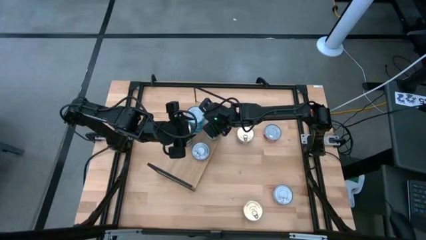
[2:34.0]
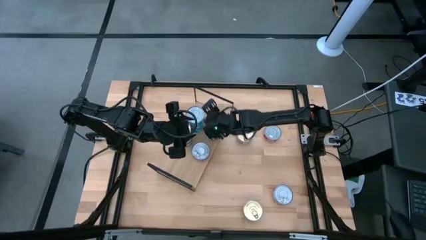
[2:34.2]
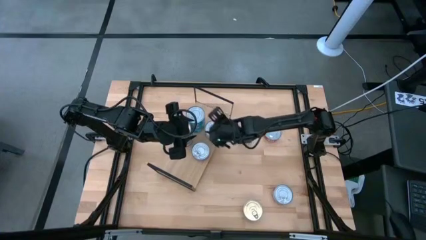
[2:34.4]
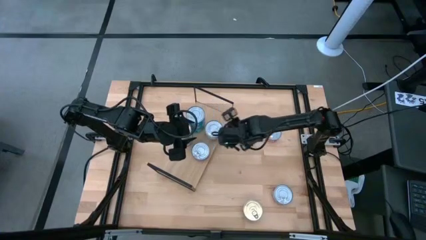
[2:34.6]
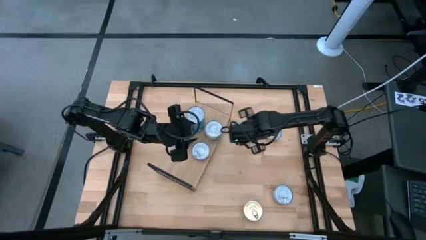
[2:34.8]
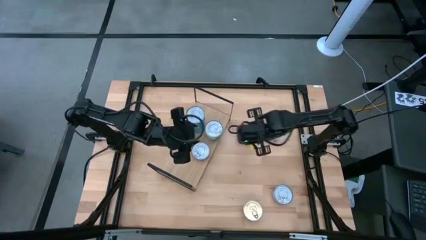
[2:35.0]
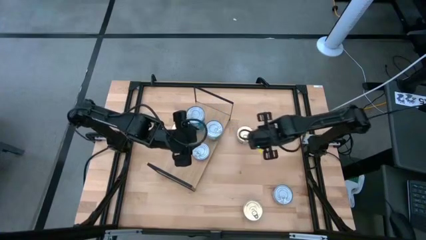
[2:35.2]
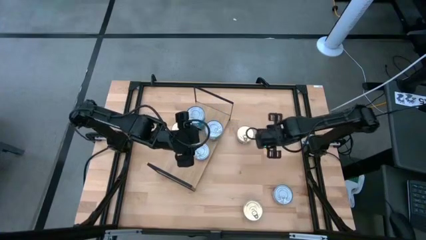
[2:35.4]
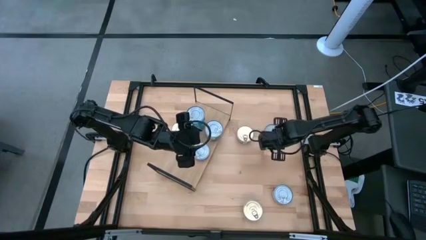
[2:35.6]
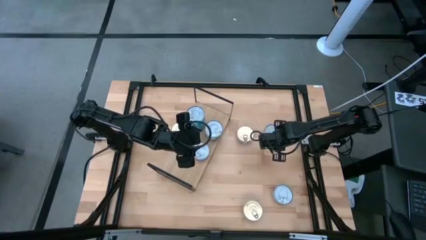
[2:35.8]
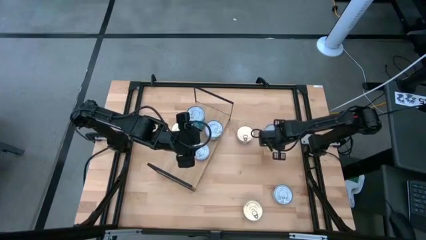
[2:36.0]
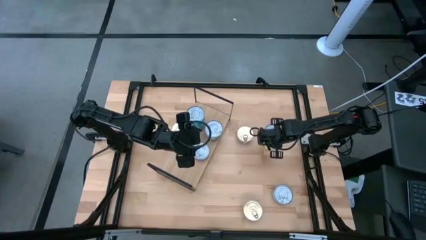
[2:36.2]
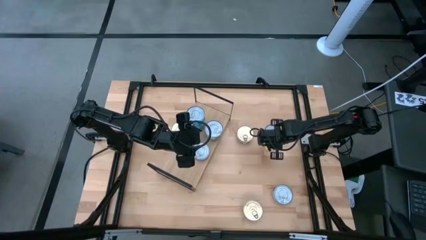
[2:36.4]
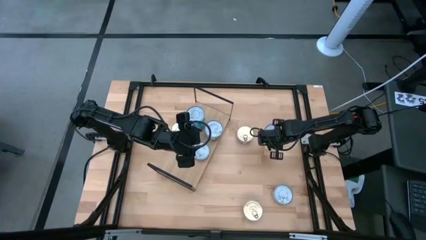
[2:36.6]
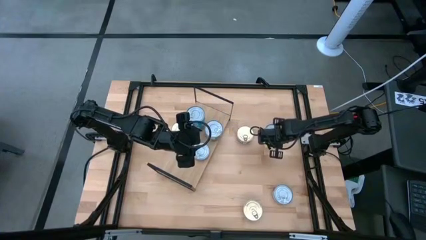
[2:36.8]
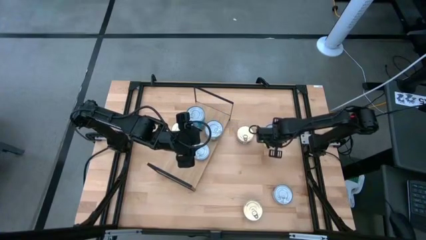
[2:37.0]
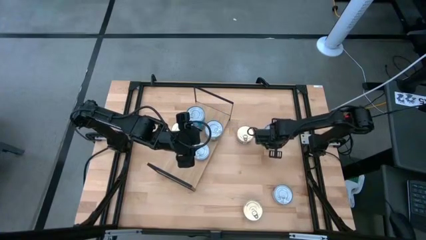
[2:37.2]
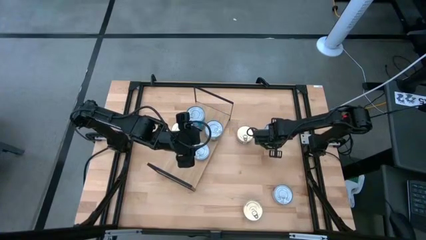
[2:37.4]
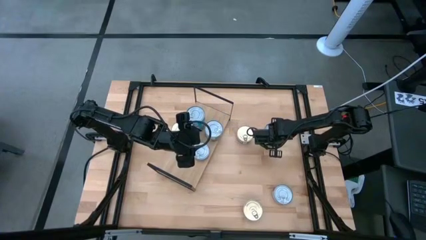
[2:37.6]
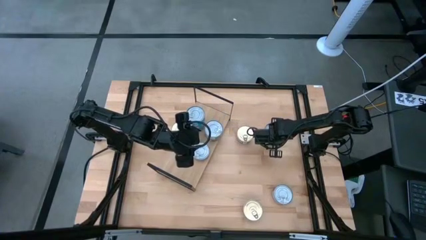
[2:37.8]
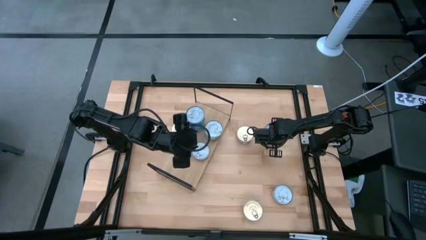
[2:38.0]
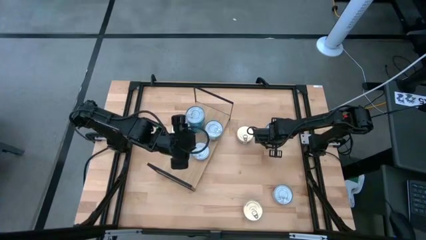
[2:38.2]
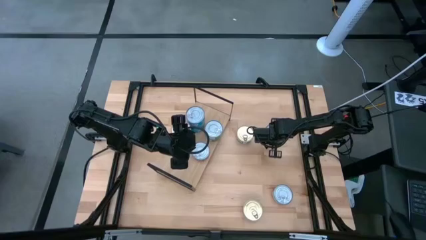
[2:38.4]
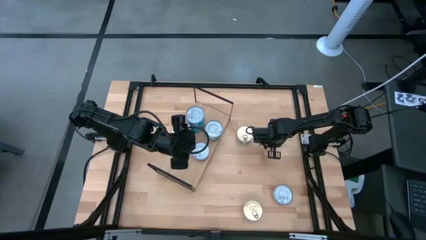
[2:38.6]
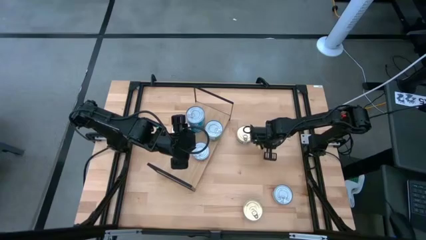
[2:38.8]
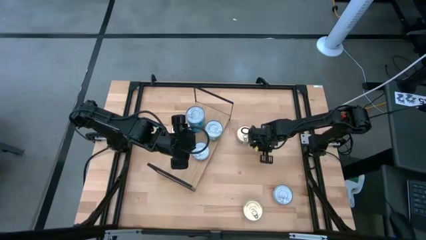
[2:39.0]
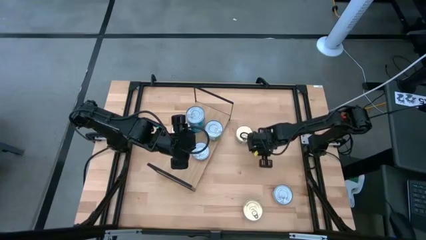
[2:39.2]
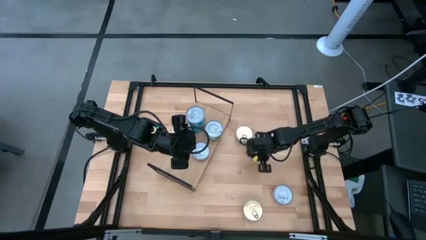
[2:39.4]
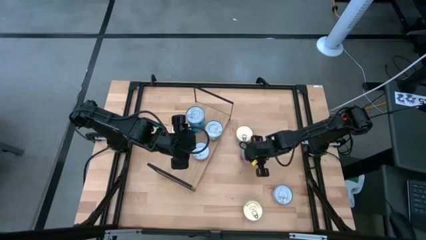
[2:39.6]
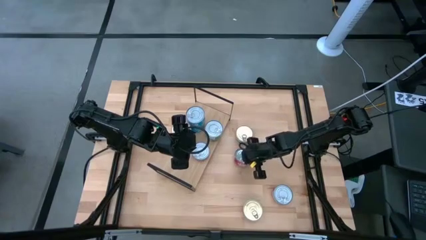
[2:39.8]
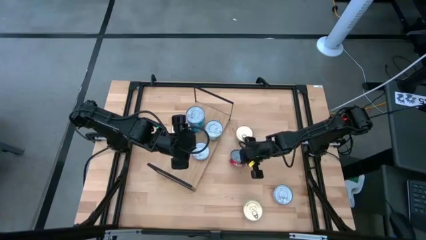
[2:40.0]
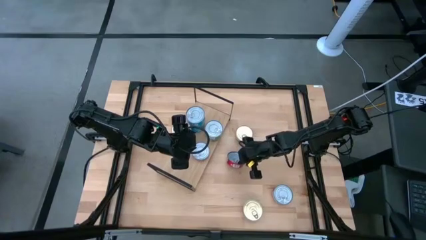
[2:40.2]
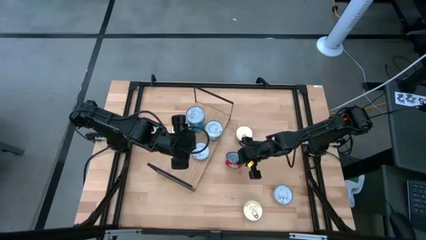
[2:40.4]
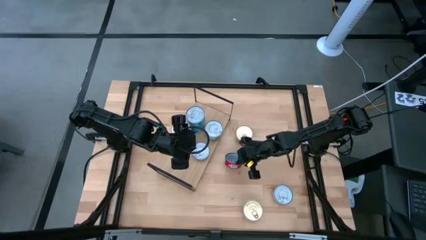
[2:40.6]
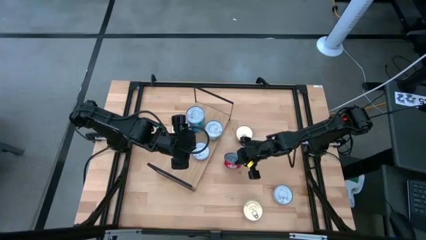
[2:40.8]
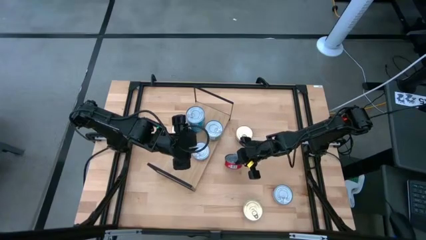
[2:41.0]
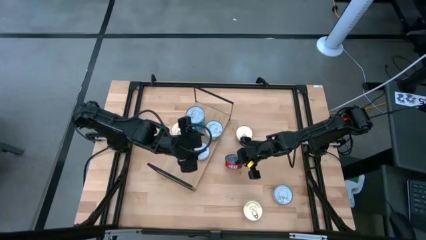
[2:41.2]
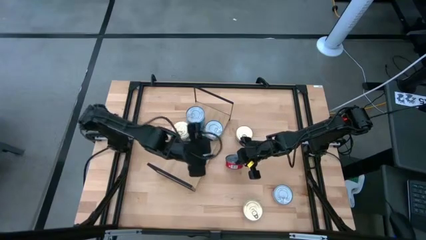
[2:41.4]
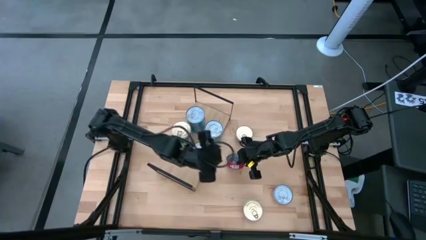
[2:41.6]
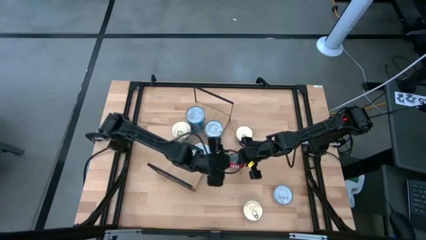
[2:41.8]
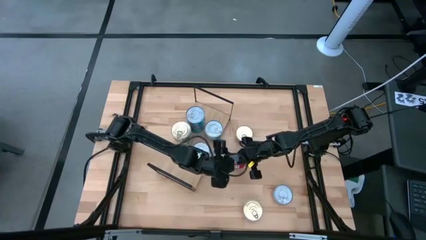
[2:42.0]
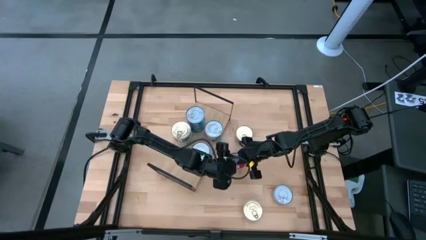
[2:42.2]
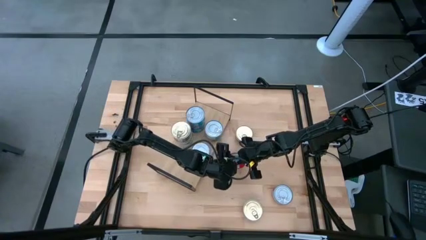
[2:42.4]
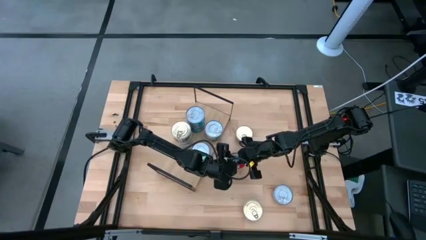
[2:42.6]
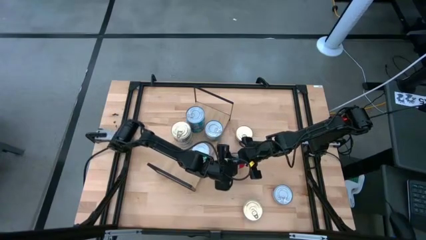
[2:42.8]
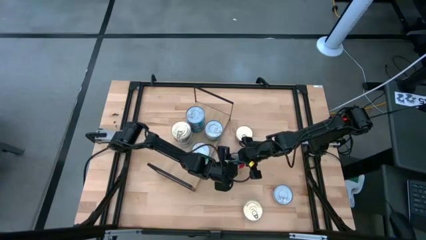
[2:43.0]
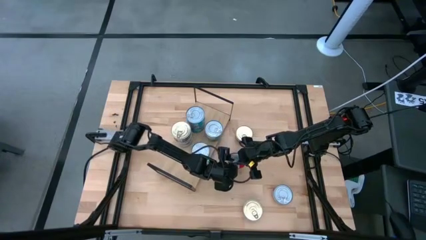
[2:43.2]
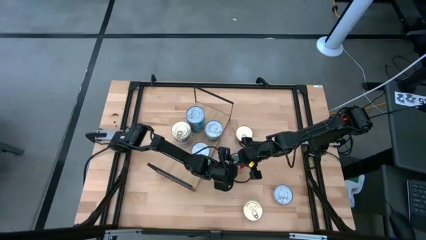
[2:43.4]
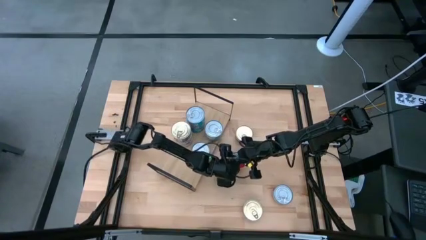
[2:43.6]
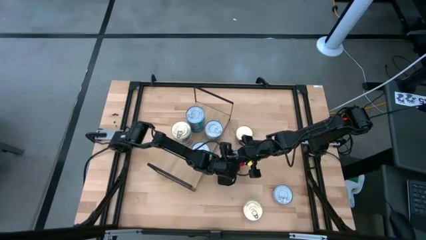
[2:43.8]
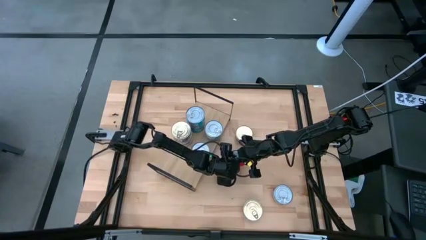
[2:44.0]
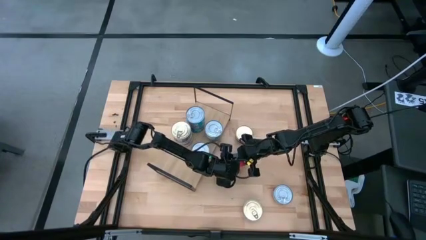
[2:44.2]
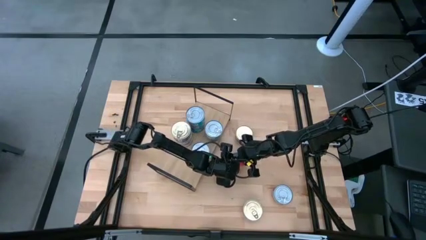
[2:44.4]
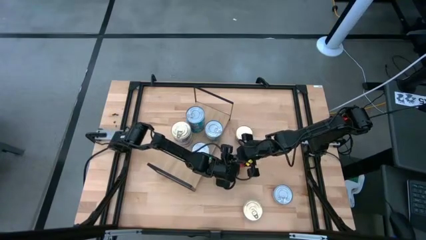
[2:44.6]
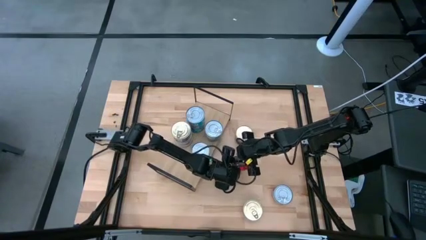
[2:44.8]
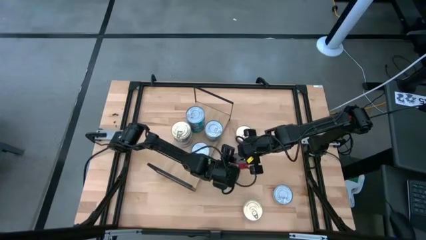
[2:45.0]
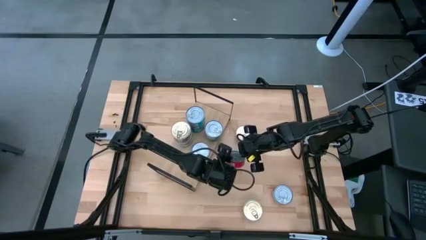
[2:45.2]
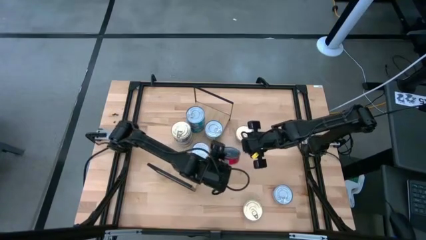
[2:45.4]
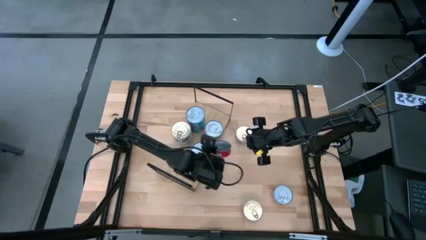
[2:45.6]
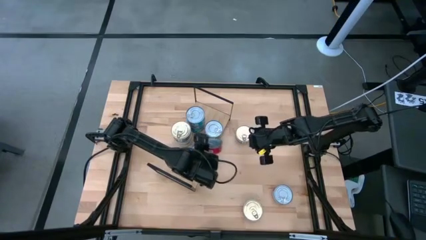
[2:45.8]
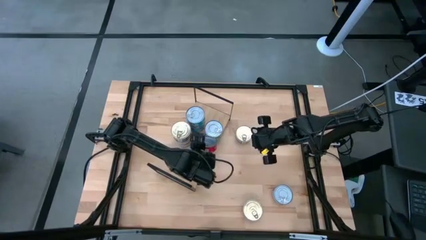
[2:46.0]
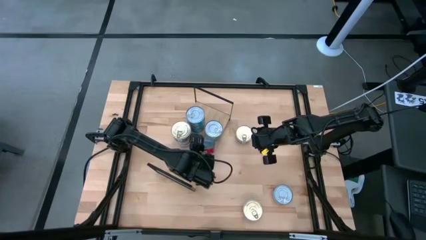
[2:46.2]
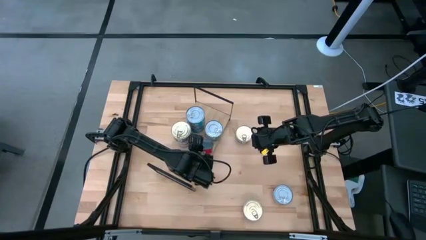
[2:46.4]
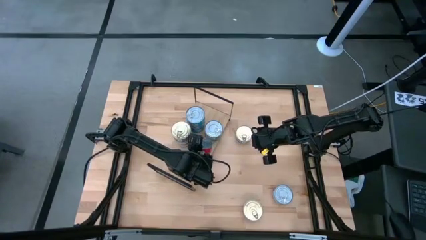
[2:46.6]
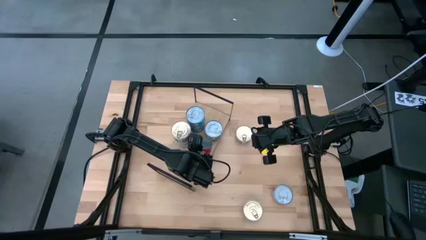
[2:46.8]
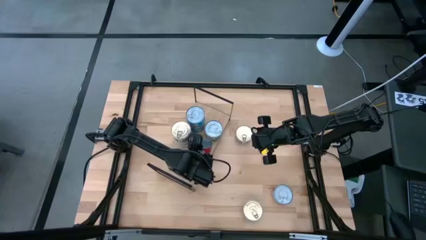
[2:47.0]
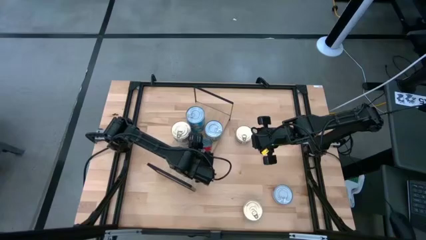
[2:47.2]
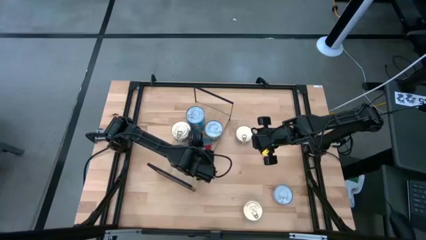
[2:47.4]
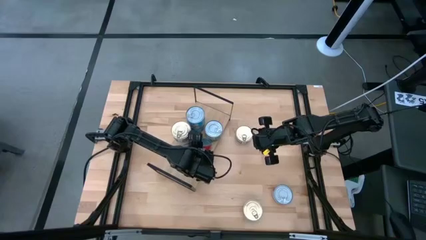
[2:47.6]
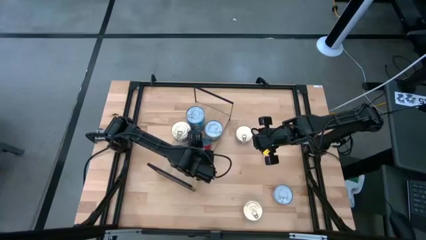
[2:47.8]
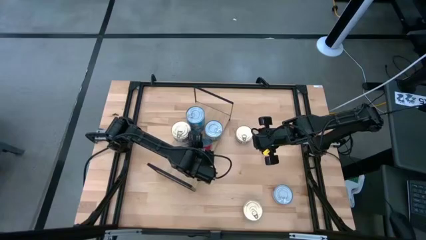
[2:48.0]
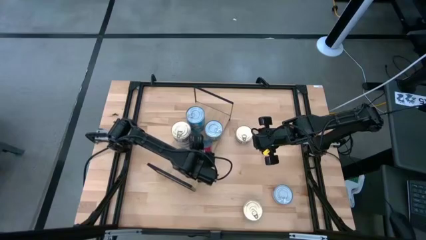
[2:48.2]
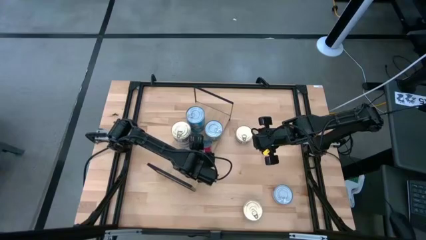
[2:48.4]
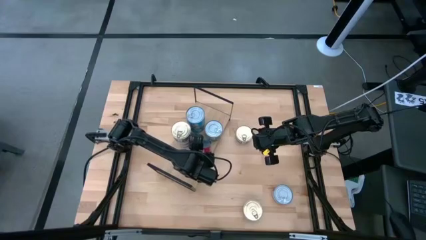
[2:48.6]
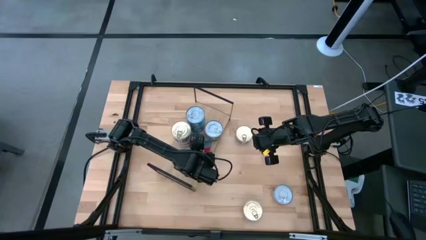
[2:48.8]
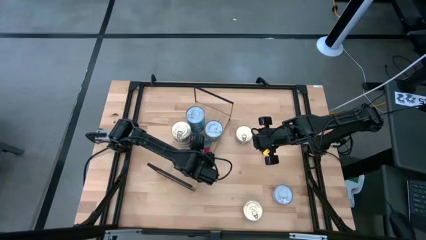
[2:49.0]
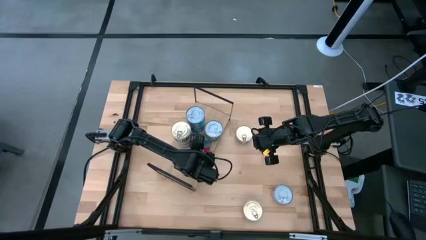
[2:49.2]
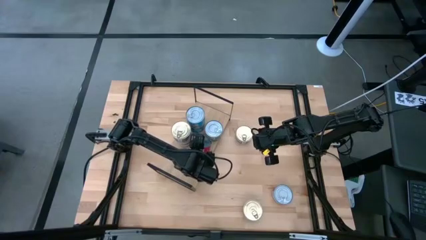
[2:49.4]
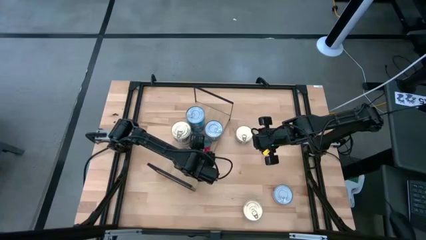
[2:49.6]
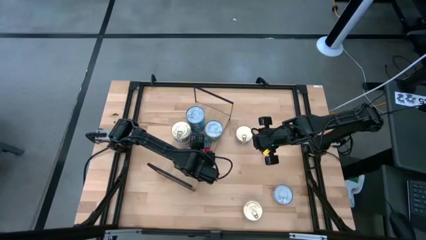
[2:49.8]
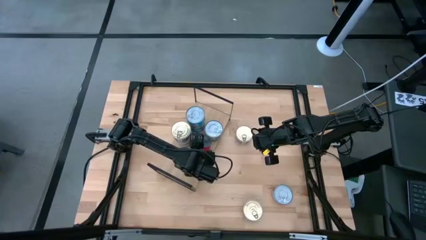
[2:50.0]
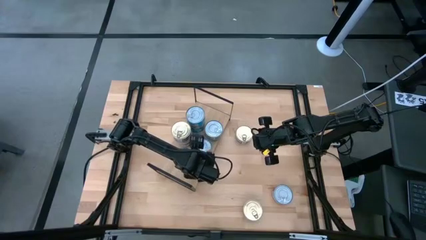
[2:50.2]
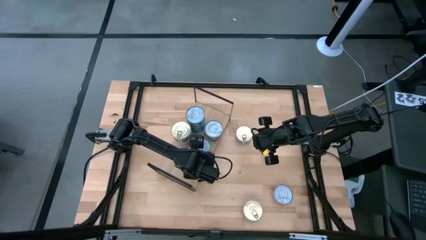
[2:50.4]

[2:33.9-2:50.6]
Task: Stack canned seafood by type on shelf
Stack the top red tuna can on top of the red tuna can on the shelf
